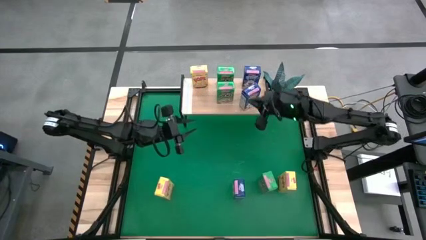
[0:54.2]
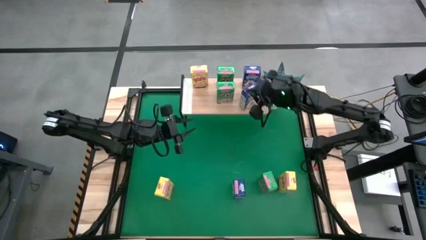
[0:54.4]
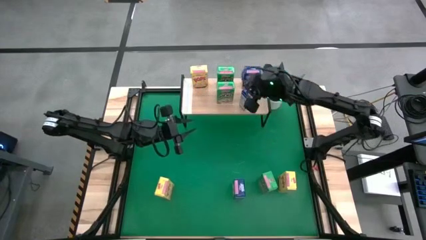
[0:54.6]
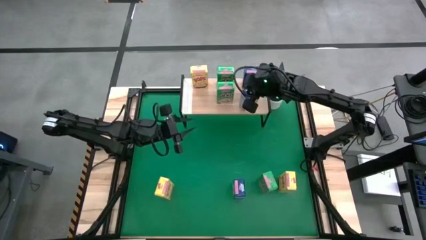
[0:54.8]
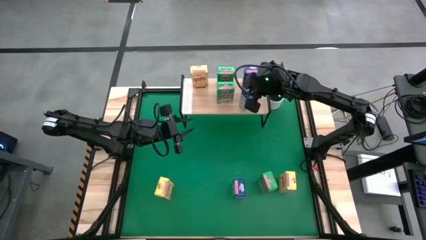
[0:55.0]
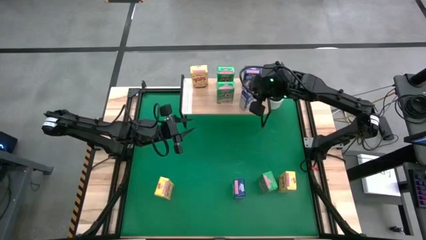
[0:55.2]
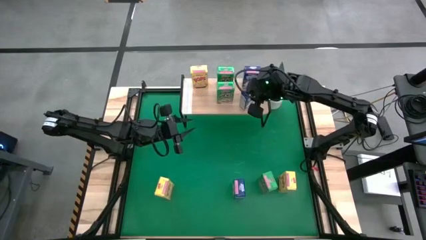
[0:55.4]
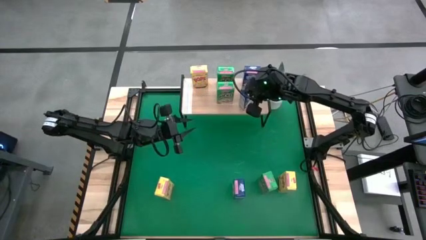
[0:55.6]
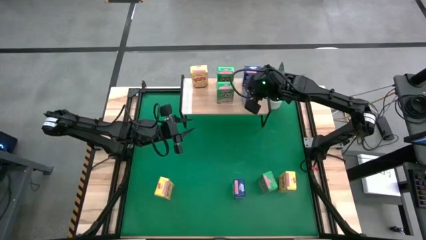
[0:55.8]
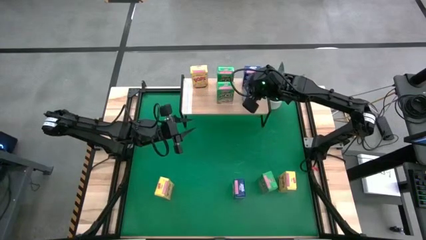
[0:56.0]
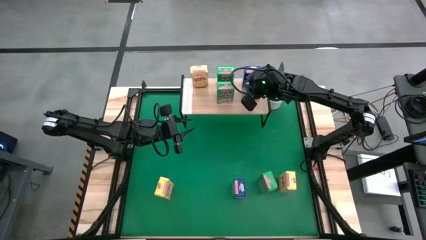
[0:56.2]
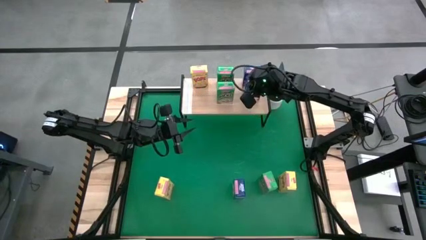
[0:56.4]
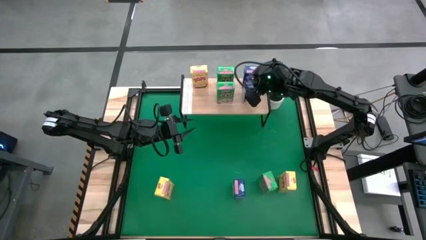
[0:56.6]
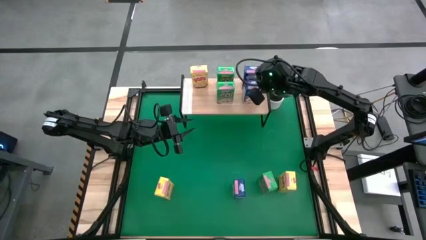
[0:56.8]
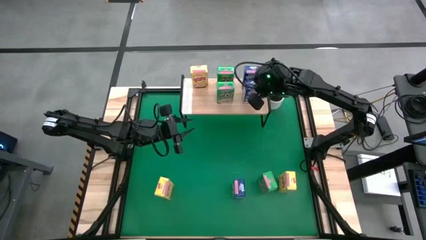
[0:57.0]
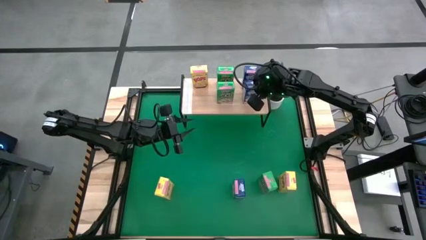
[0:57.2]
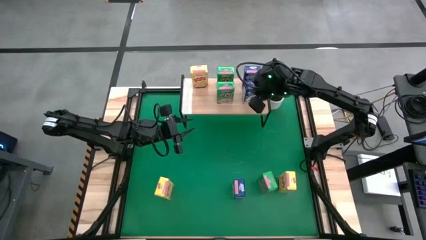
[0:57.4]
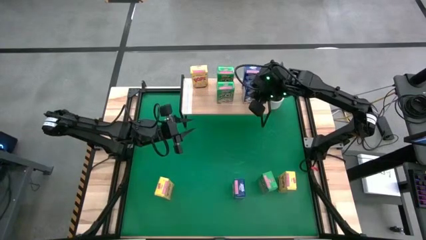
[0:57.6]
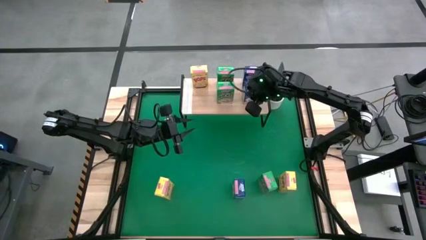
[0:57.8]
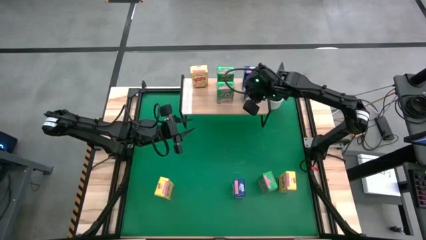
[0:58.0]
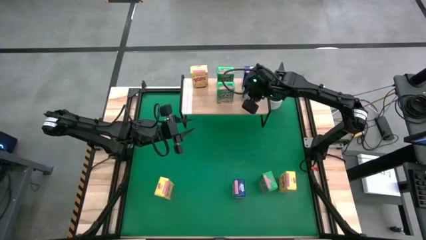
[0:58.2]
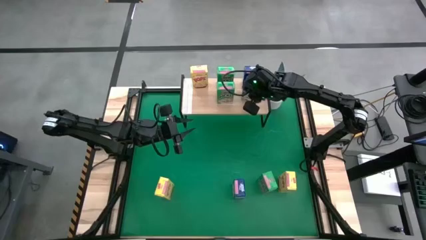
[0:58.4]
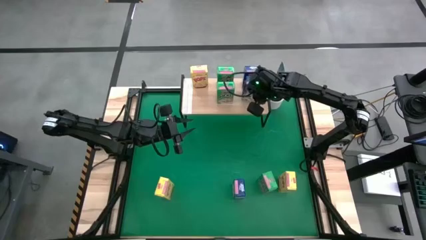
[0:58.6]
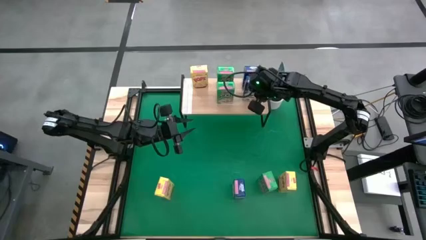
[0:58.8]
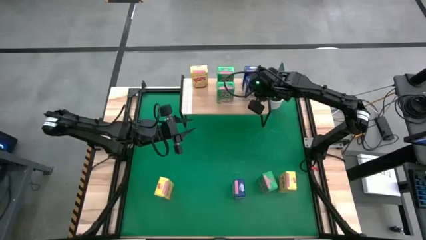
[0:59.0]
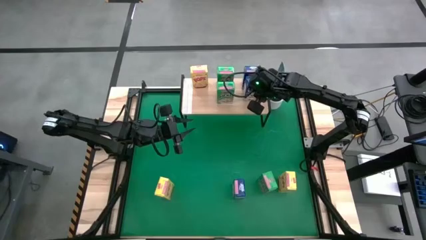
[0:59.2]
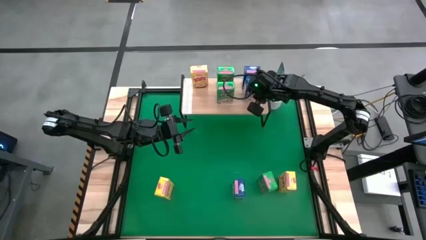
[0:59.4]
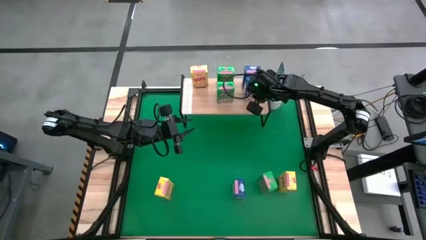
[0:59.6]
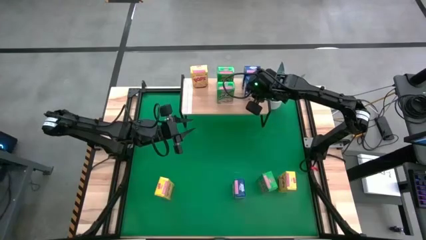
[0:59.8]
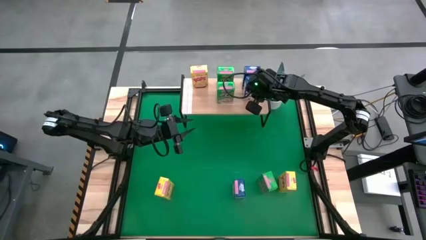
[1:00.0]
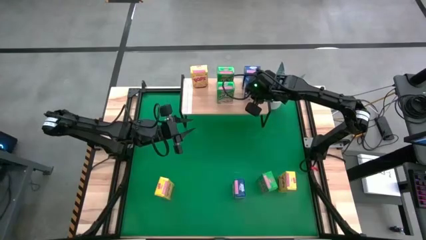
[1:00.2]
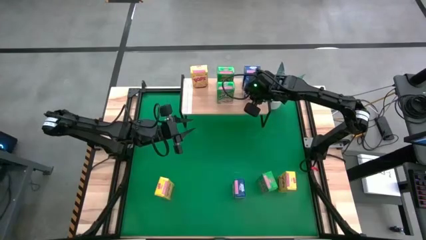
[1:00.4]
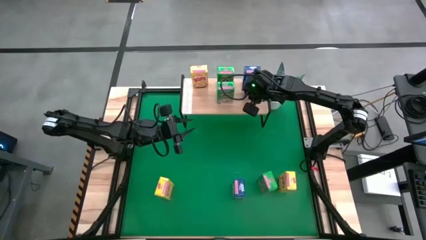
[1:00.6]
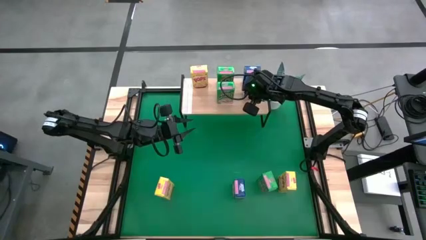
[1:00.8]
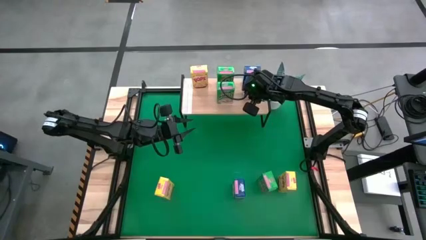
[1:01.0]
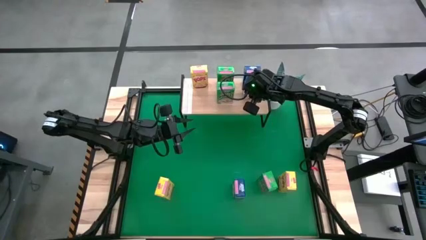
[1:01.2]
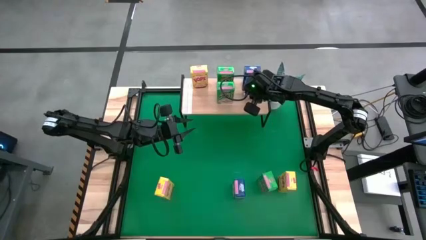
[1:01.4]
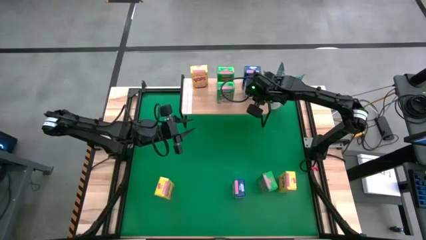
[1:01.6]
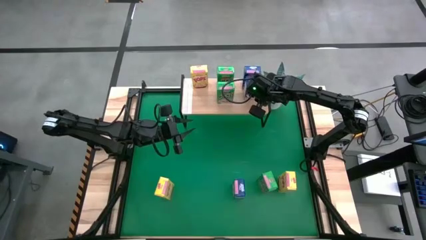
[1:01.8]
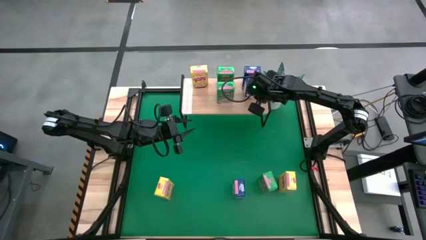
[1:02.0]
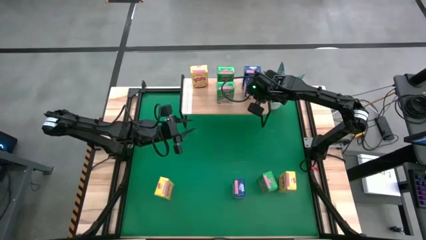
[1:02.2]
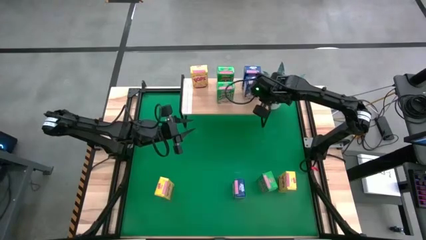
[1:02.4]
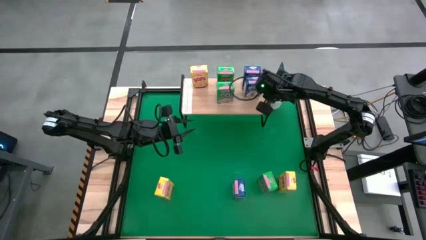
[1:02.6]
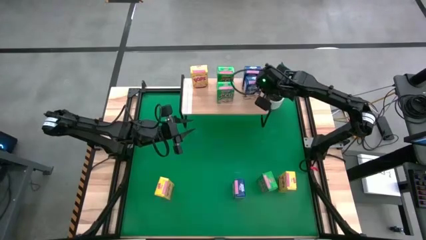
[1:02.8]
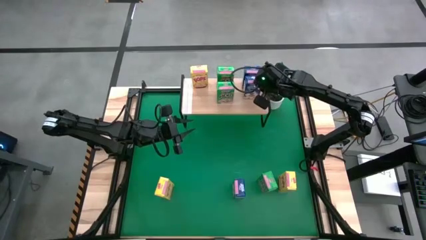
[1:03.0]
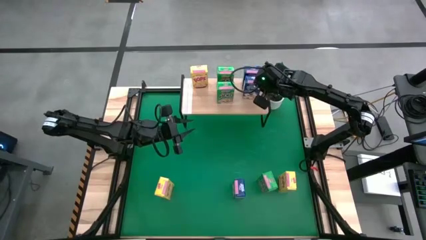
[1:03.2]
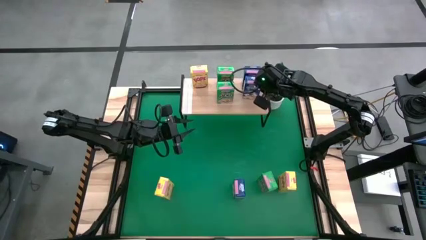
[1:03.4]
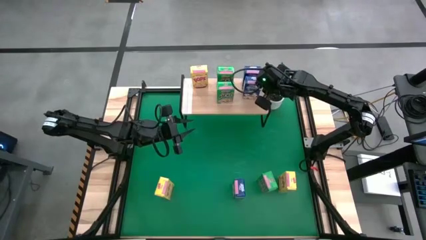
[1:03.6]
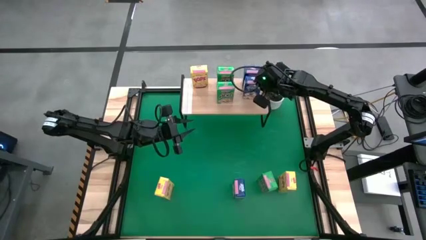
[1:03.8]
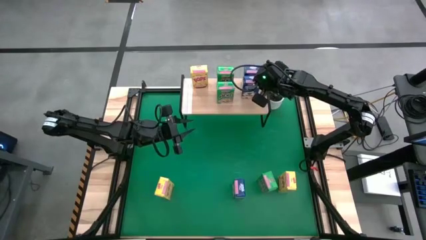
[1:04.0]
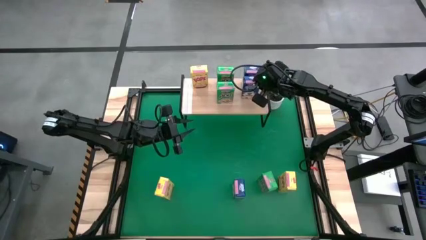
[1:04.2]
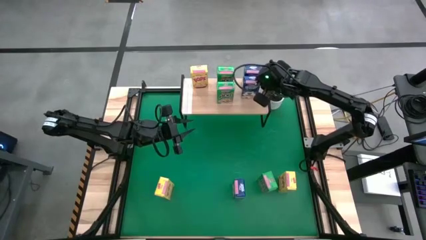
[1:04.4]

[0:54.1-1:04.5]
Task: Stack cereal on shelf
Put the left blue cereal box on the shelf aligned with the other blue cereal box
